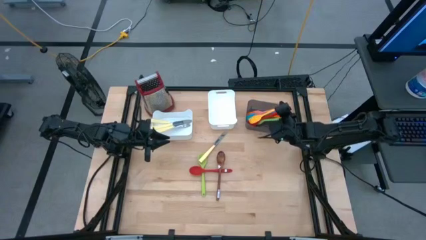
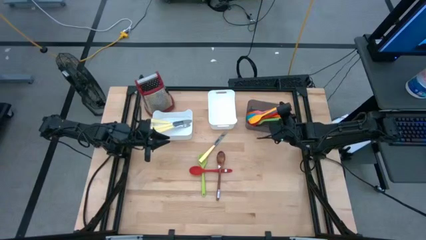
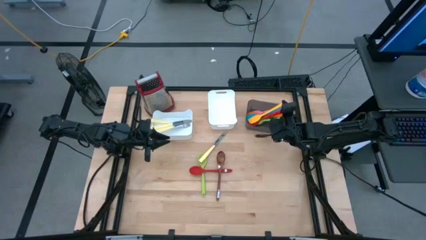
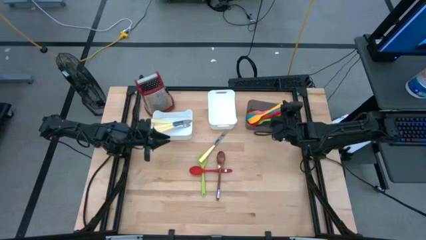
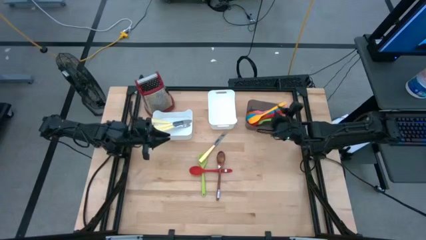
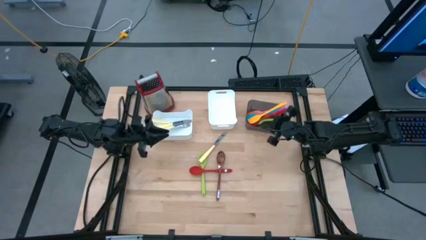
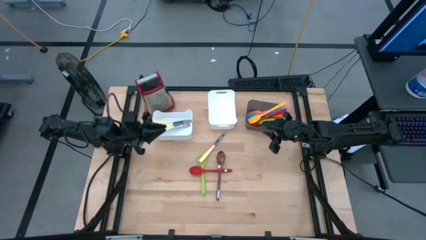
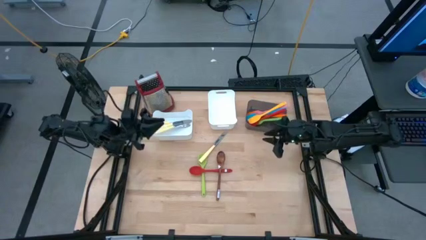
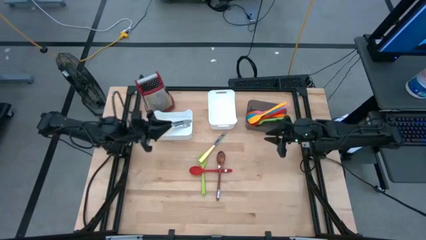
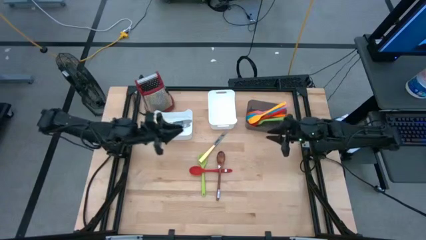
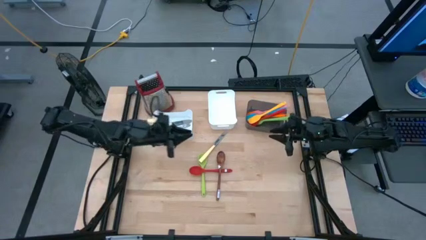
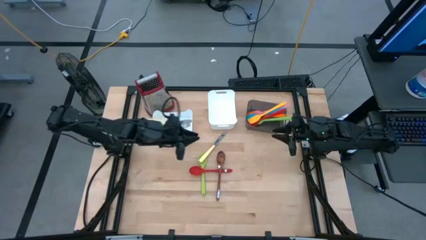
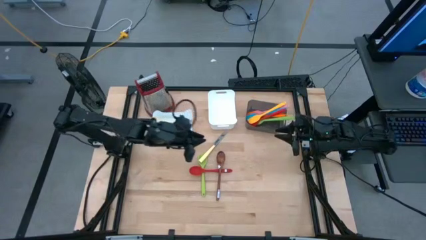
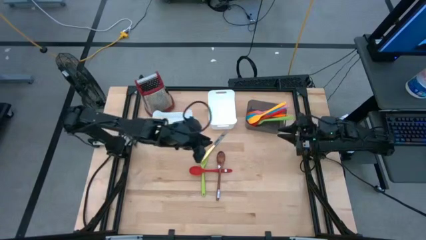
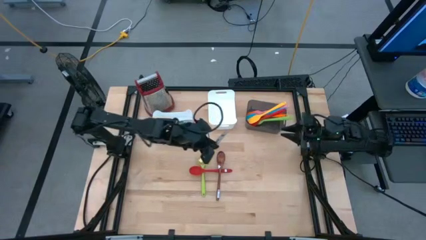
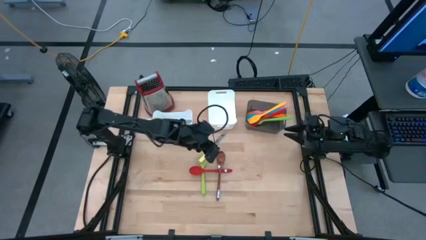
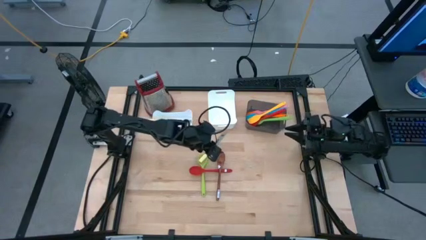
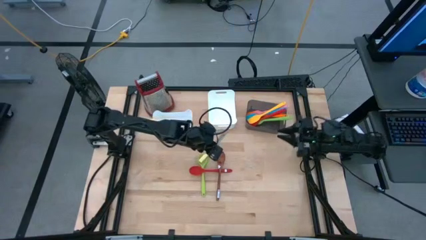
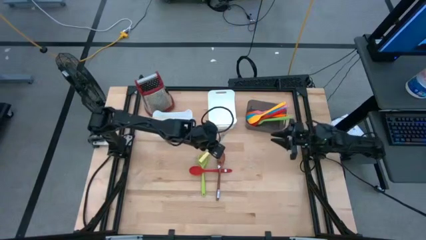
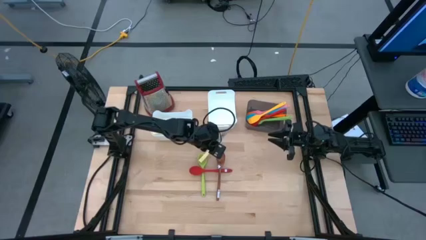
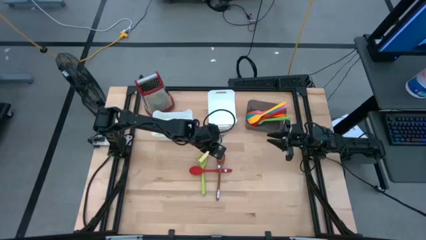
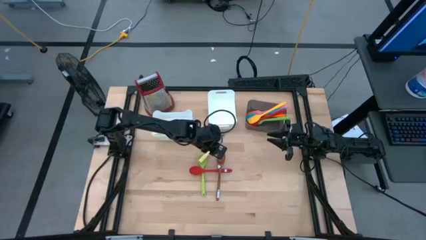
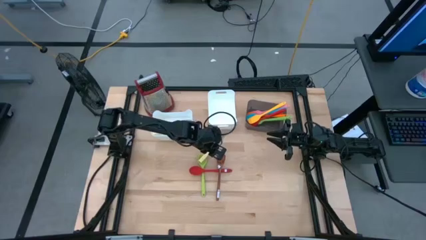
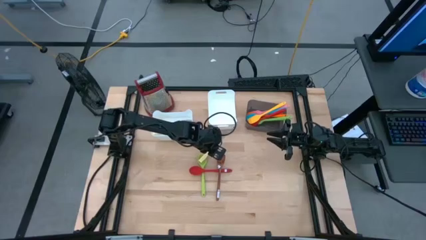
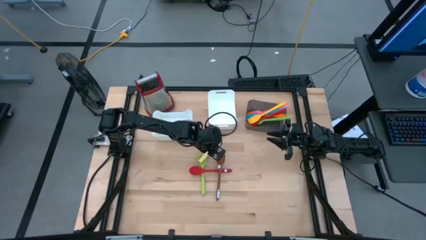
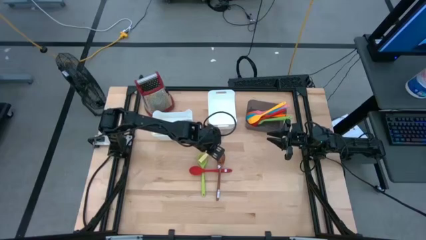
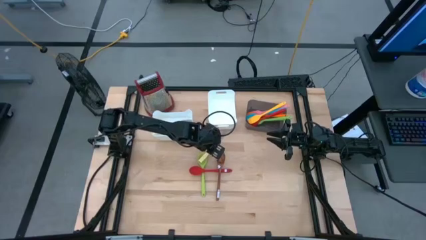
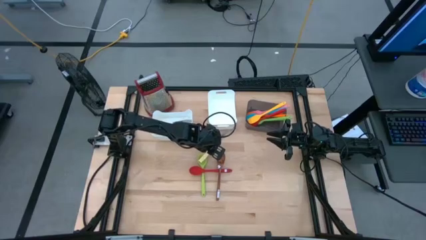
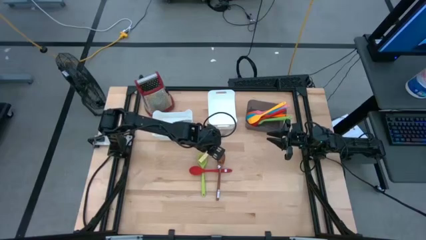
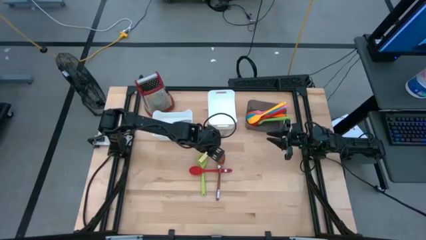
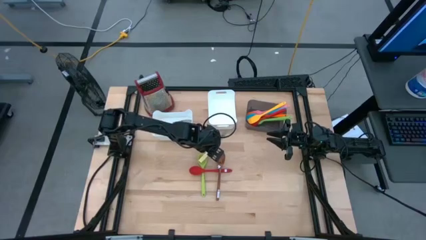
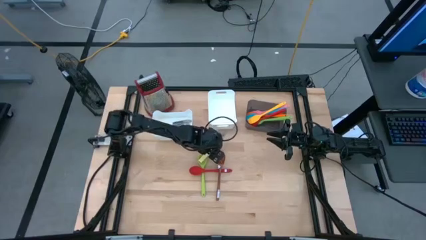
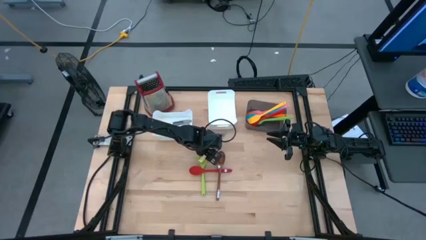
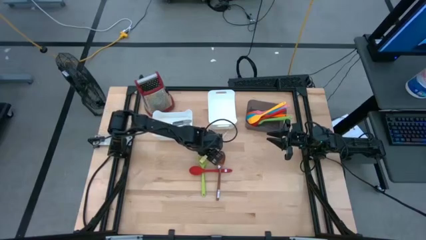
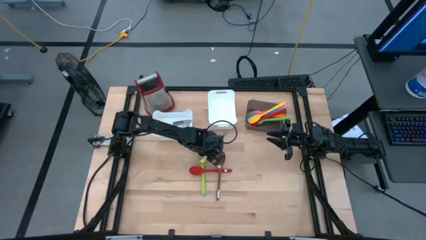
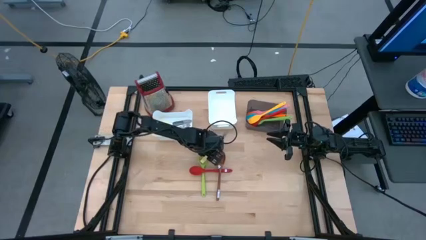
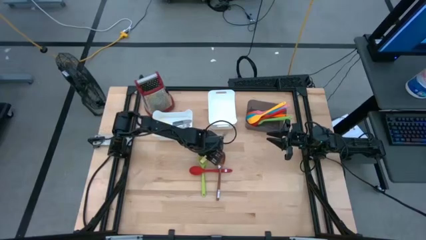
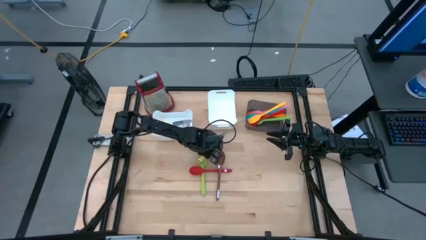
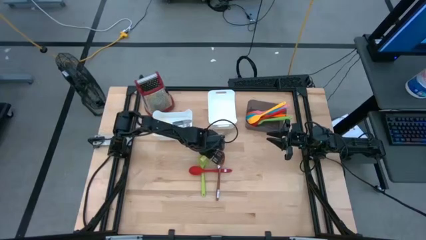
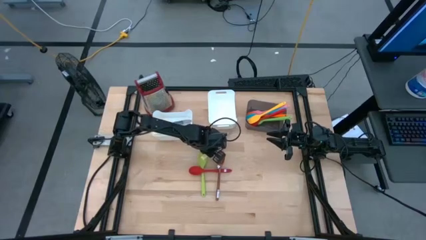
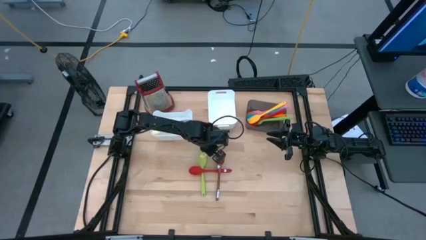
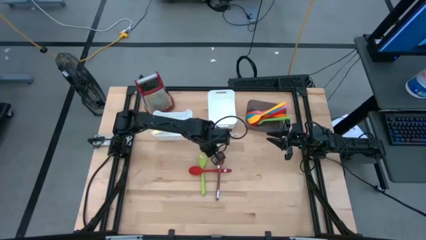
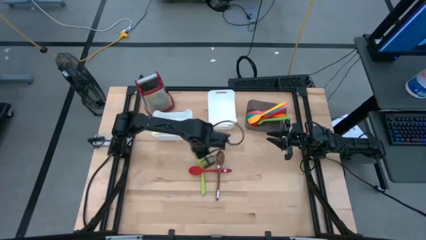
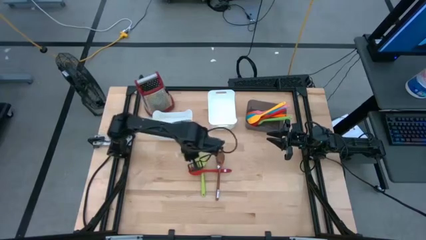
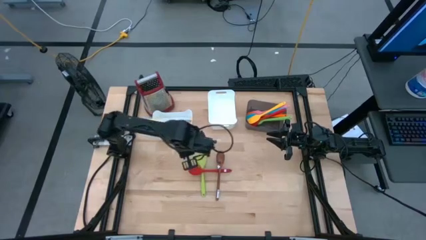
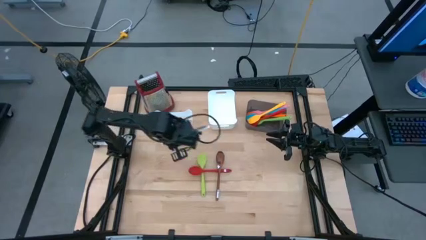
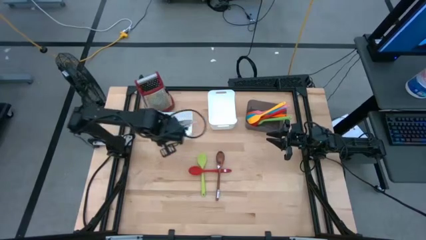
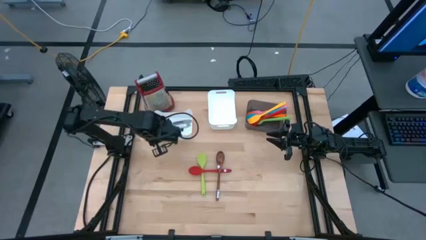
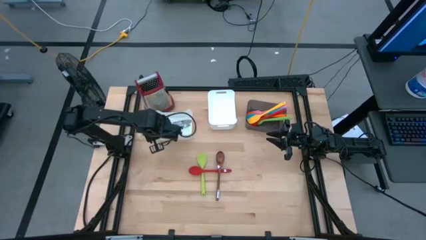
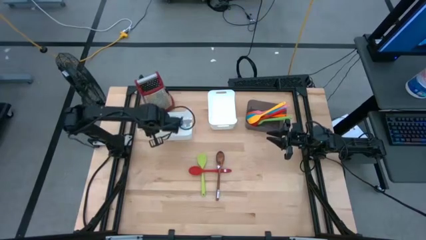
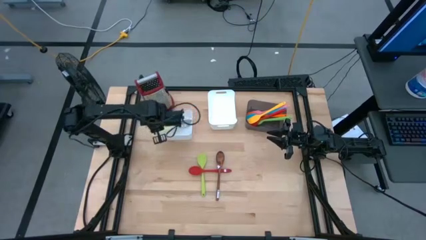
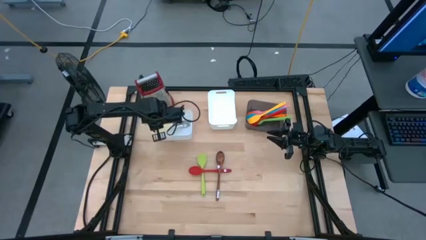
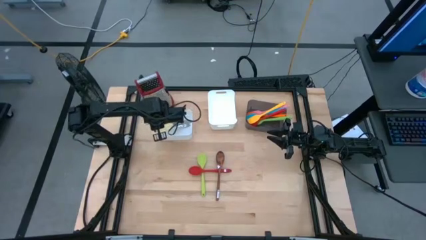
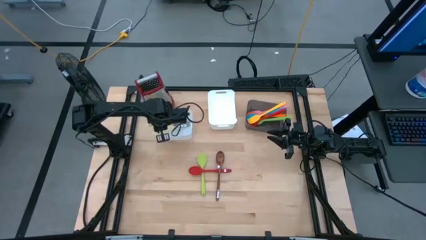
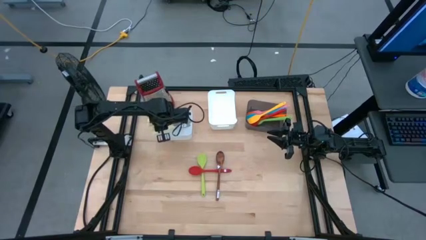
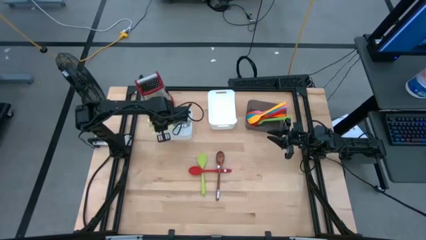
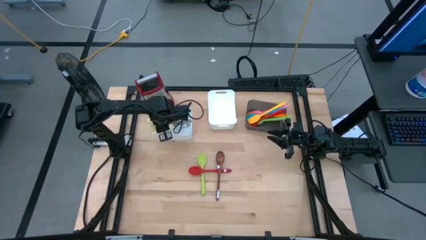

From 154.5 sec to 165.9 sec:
Task: Pick & Place Kitchen Items
Put the yellow knife into the left white bin
